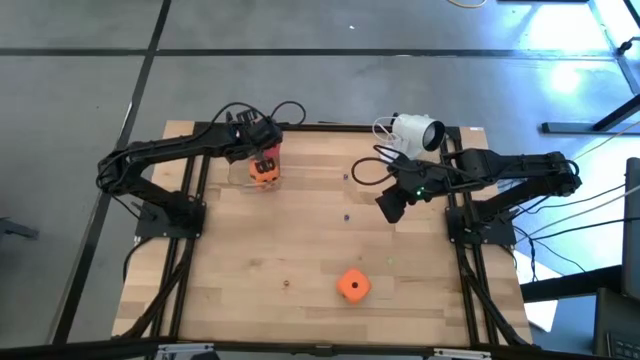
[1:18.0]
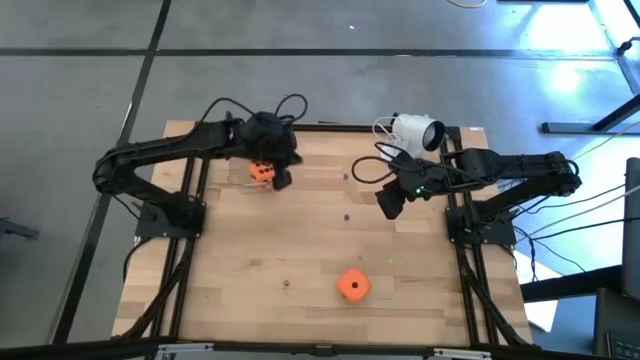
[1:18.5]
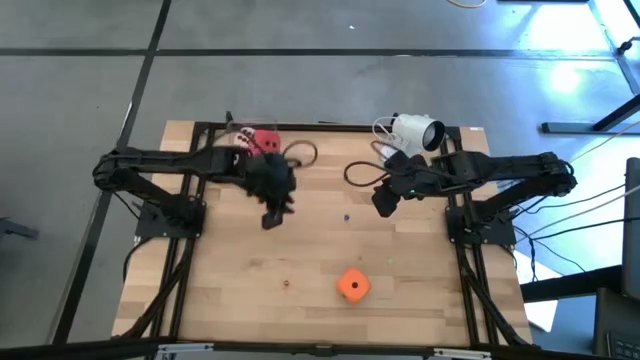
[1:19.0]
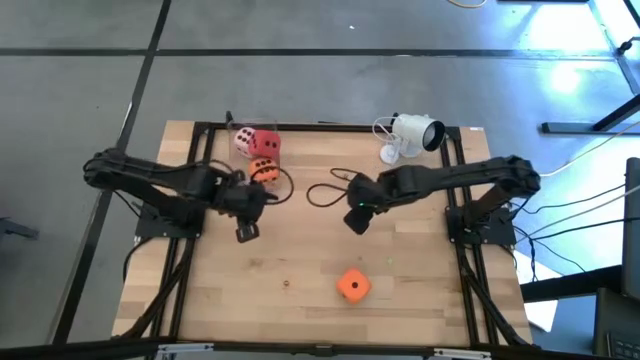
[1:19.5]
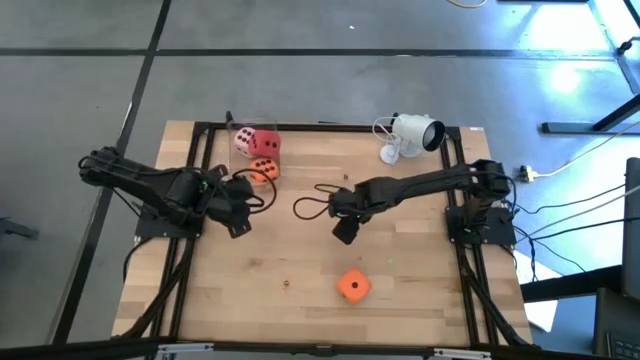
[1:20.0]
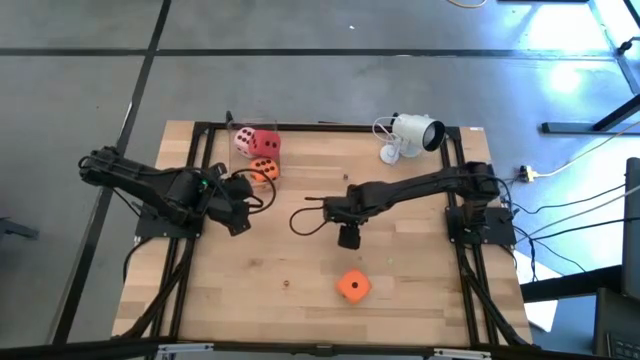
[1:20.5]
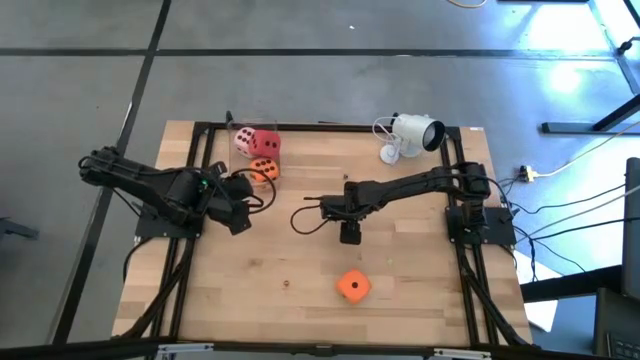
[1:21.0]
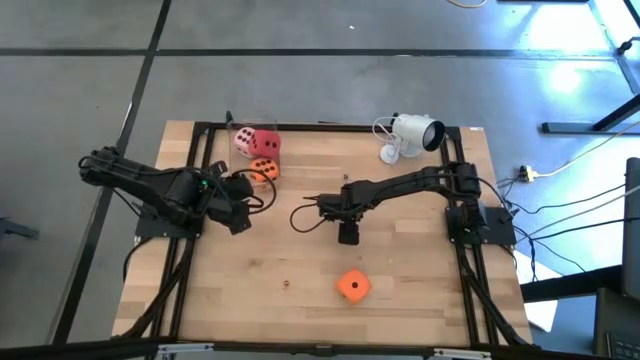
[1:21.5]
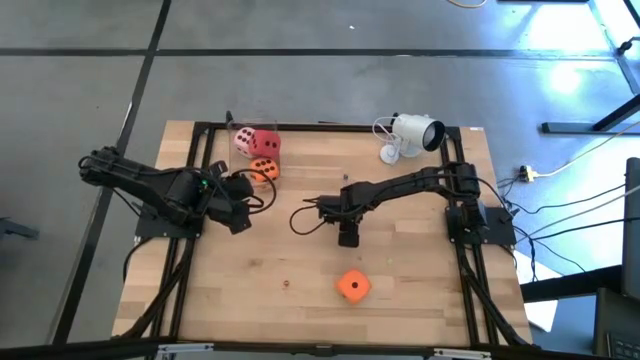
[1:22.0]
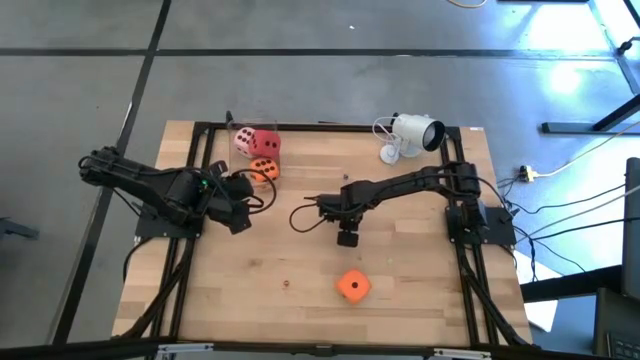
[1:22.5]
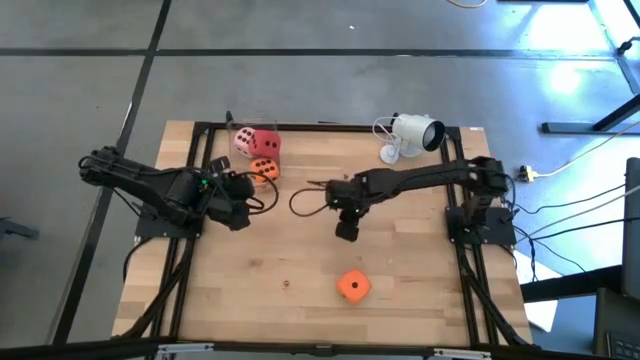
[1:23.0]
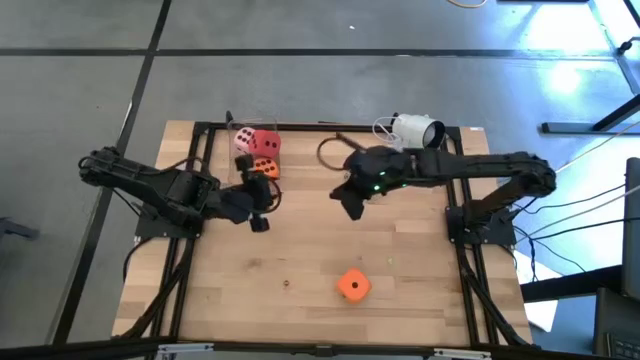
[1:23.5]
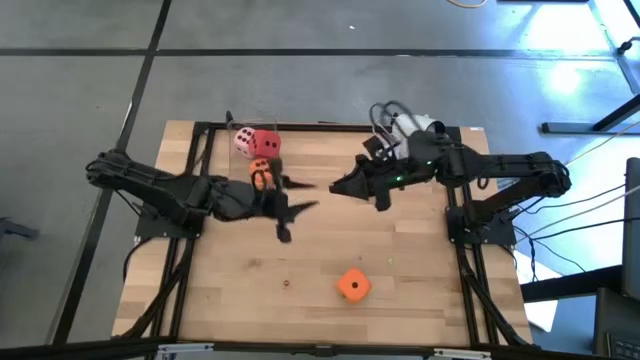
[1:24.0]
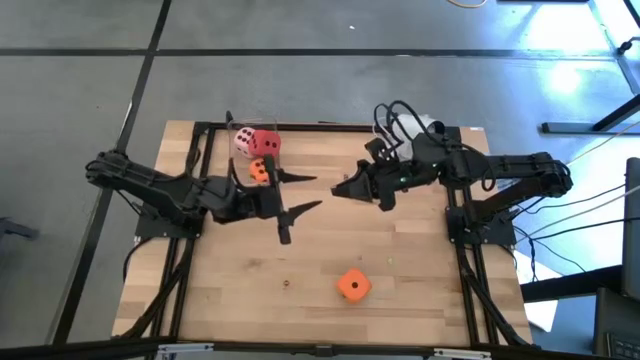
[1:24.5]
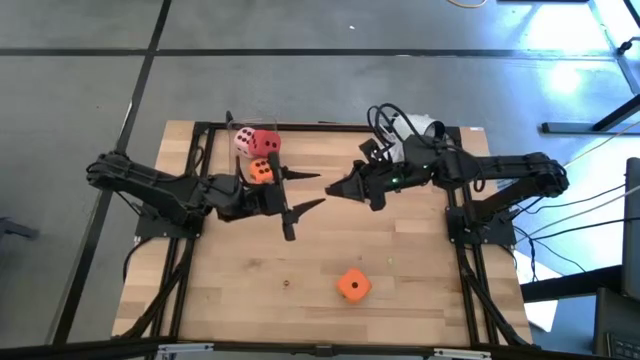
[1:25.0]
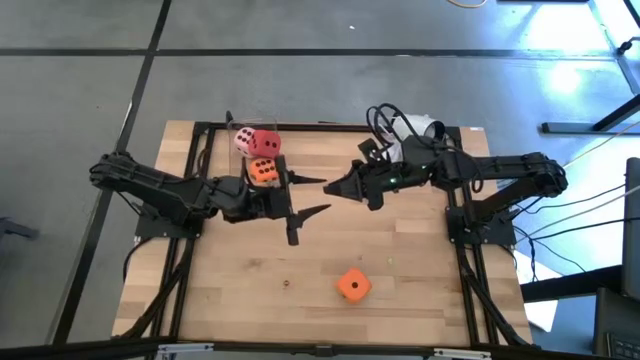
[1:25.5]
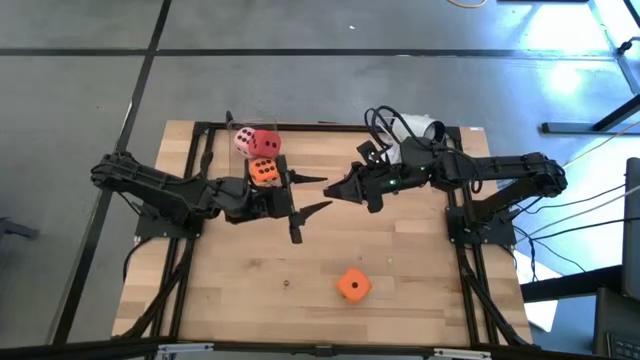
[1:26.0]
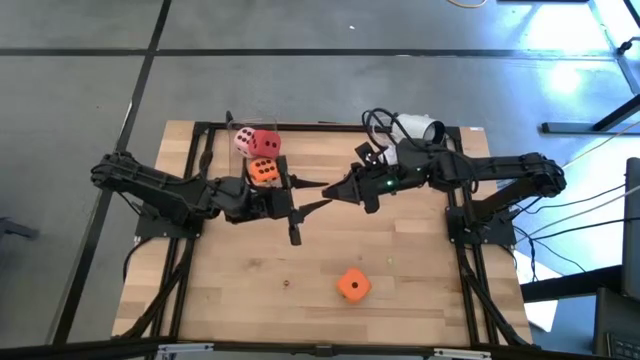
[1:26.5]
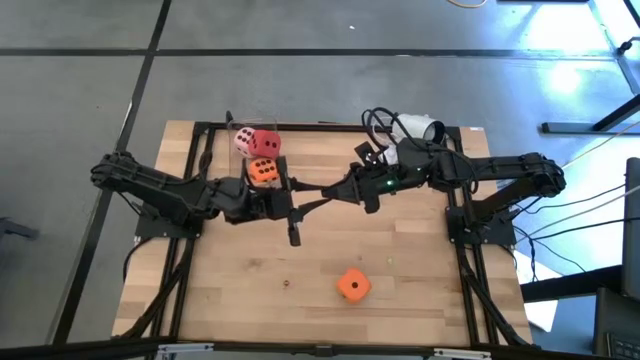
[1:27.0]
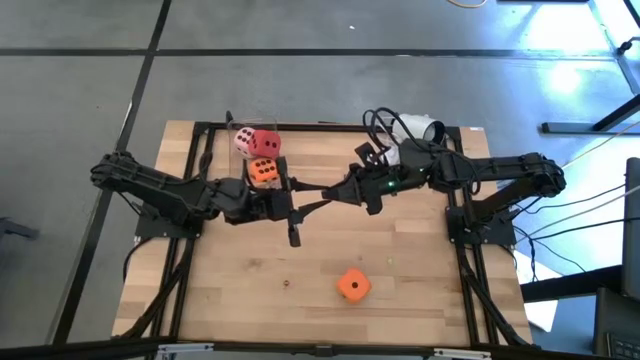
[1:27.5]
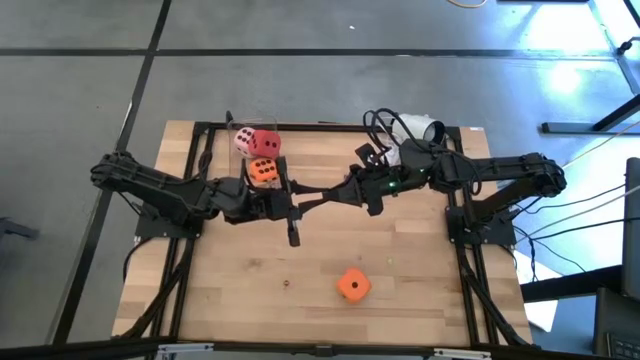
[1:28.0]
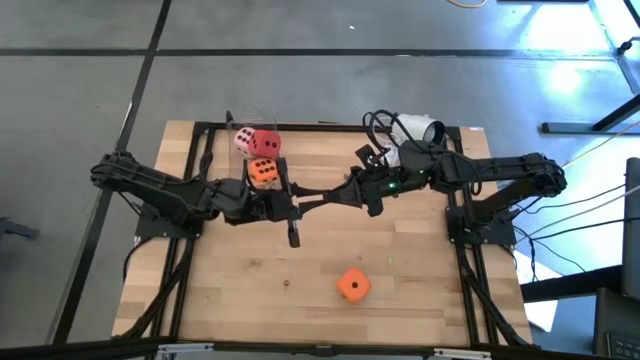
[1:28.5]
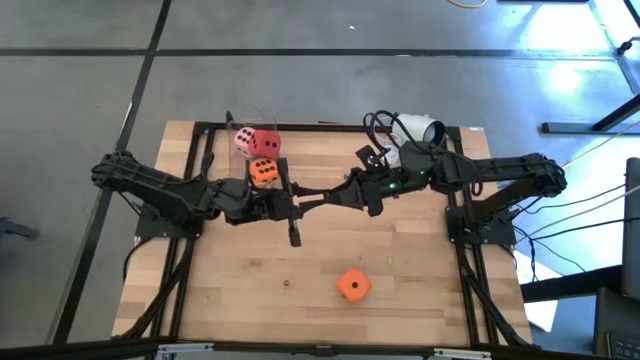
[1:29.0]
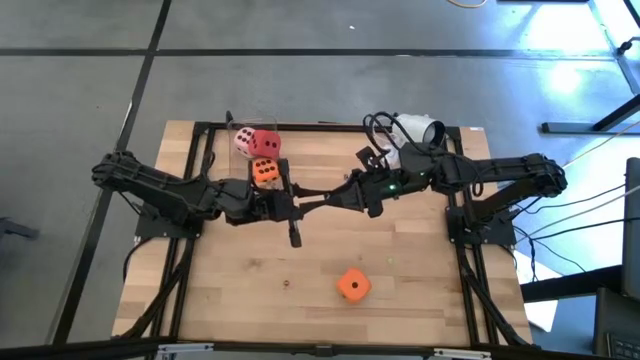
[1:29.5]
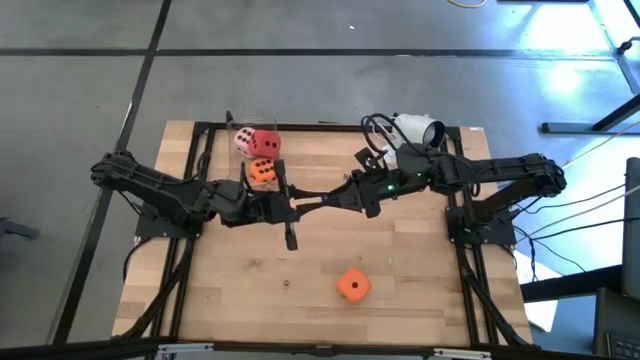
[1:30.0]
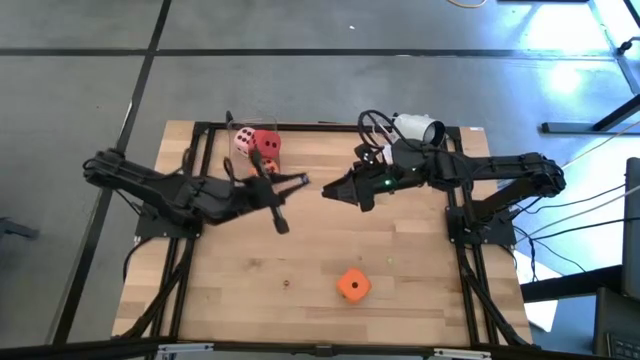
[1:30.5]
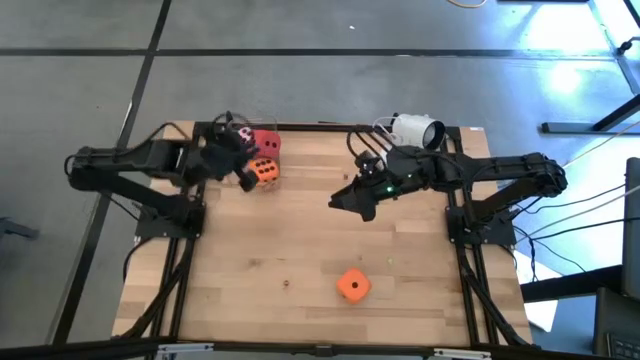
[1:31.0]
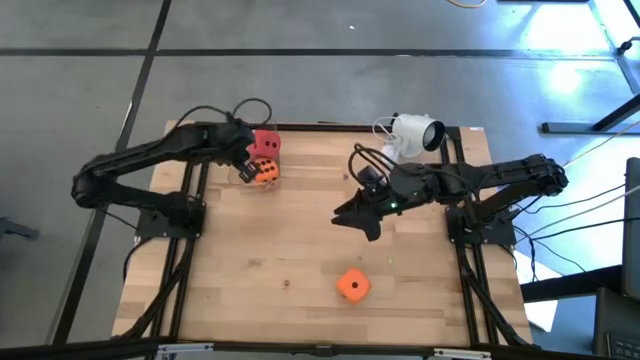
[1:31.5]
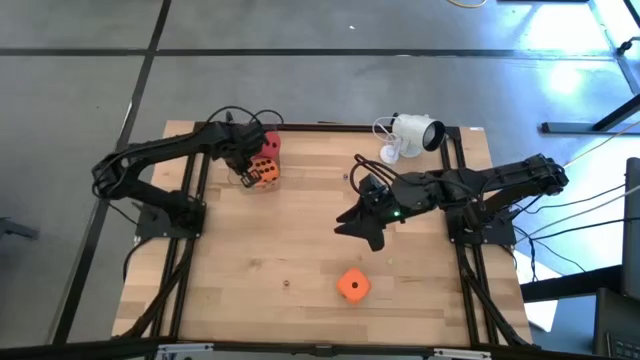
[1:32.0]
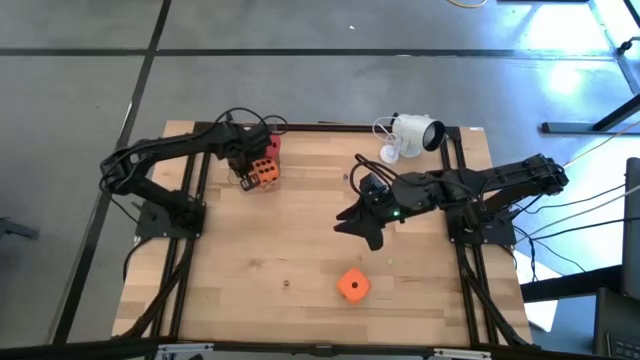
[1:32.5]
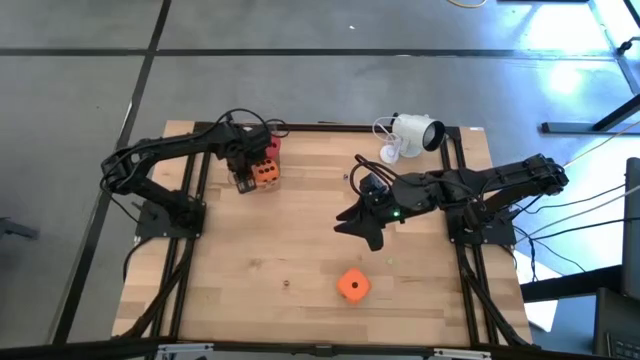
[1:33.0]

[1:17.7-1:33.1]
Task: Pick & Place Dice
Put the bottom small blue dice into the transparent bin

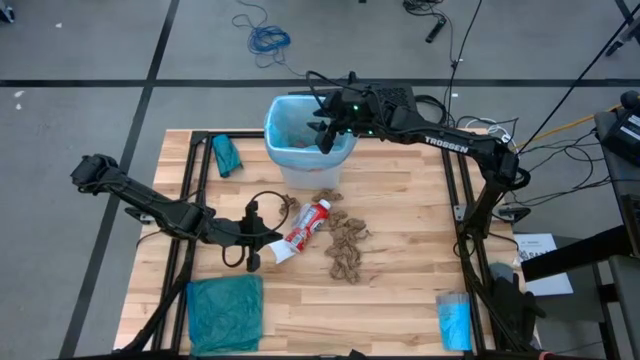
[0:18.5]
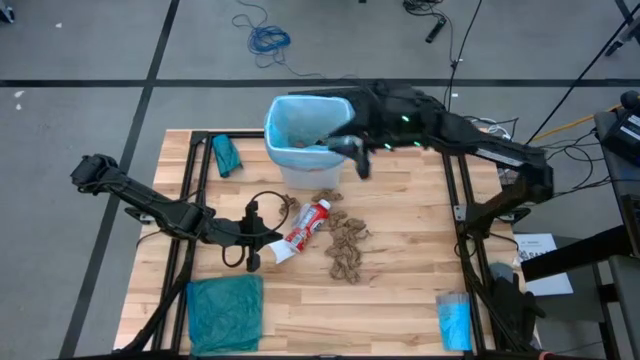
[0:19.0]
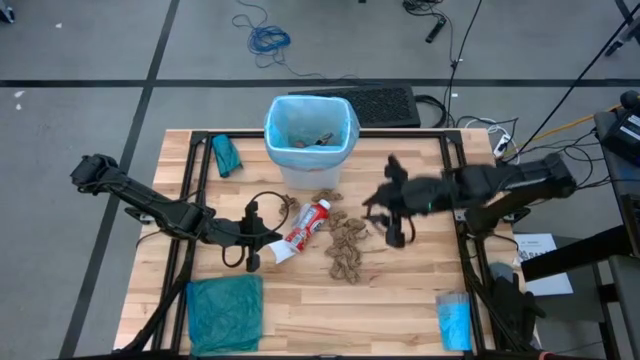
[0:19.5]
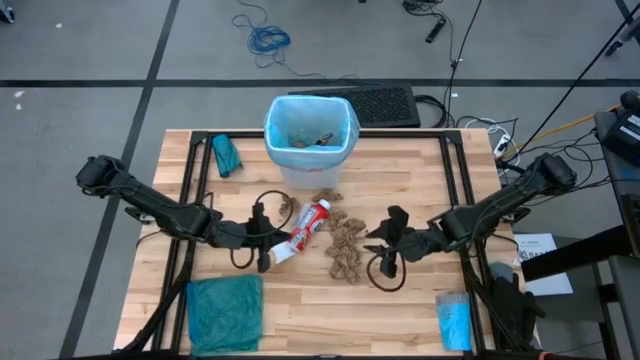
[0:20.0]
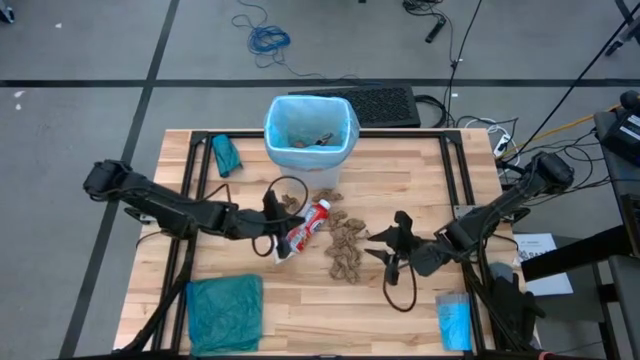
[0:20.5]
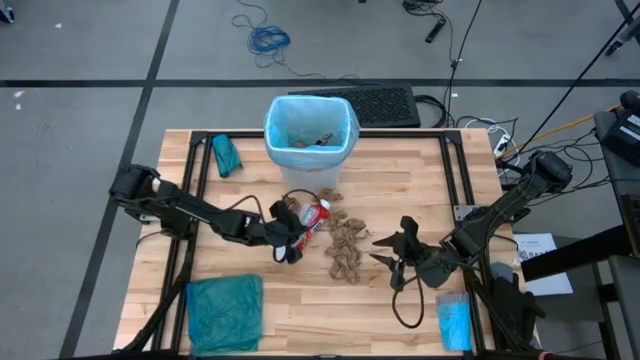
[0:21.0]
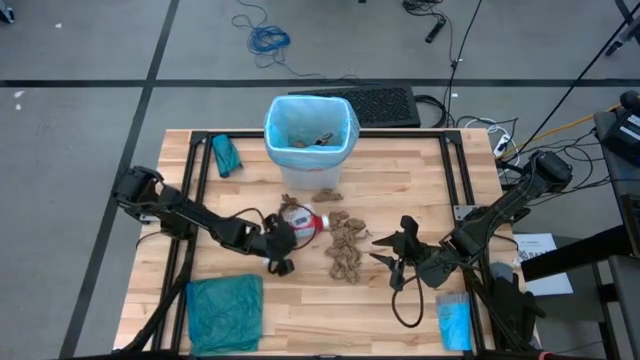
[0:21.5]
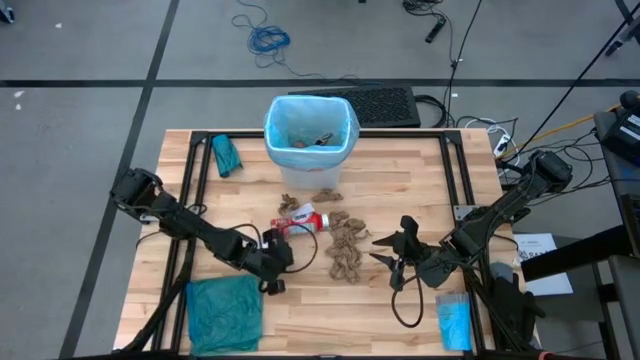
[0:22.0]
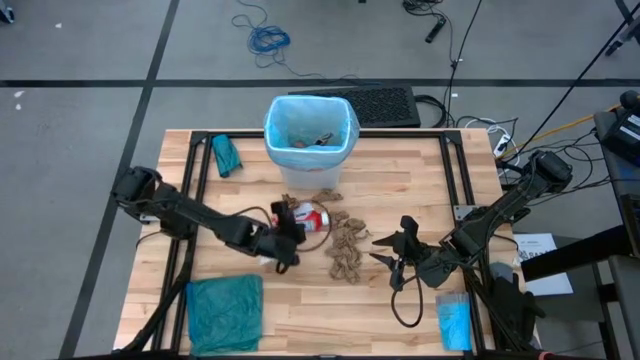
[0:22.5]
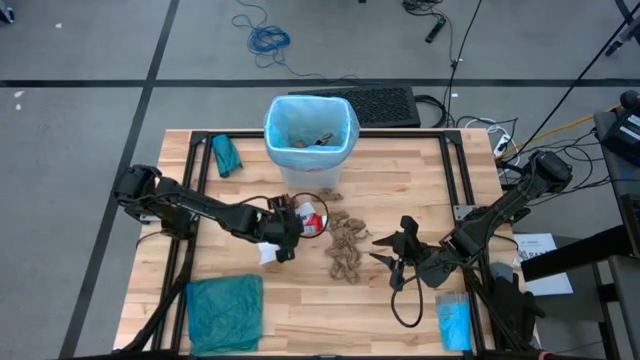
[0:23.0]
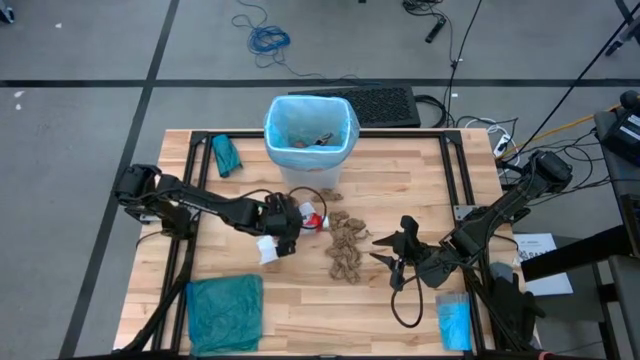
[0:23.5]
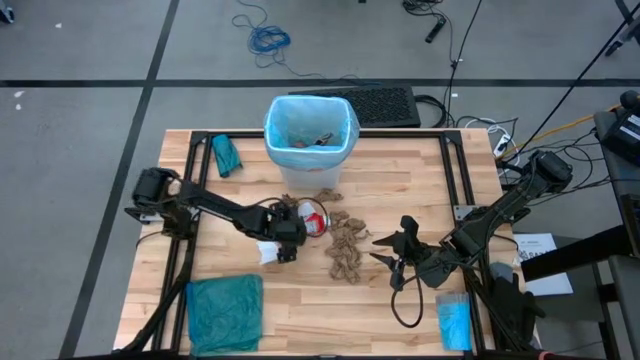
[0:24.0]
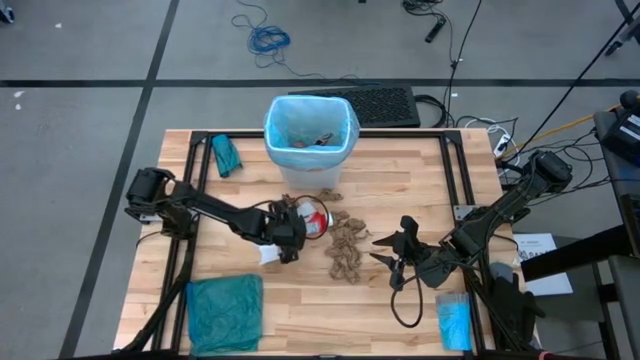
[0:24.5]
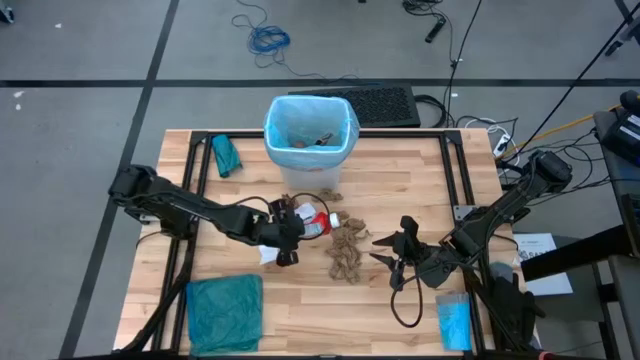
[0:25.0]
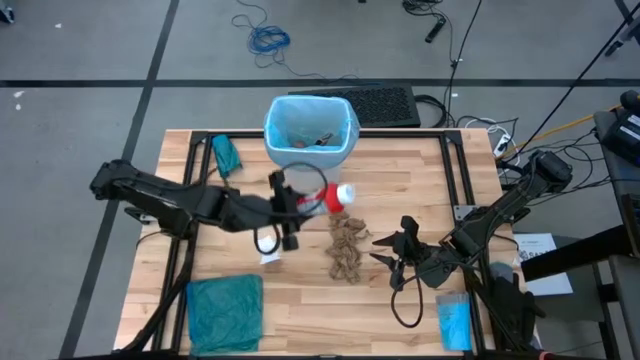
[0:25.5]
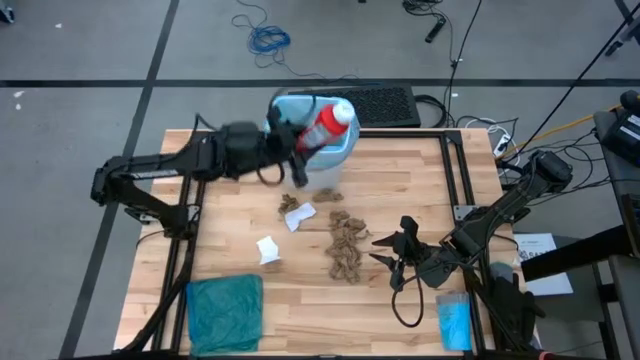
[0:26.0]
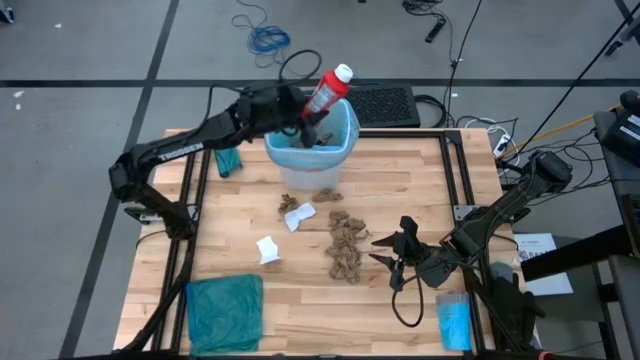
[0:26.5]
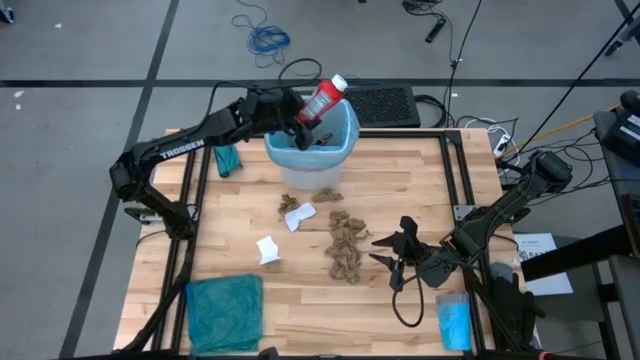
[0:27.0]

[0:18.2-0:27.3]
Task: place trash/remove bag and relplace
Put the red plastic bottle into the blue trash bag inside the white trash bin
